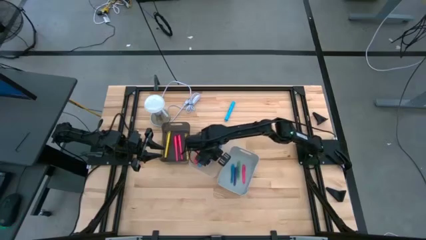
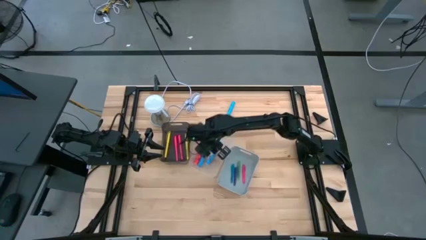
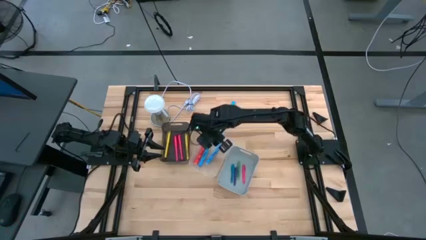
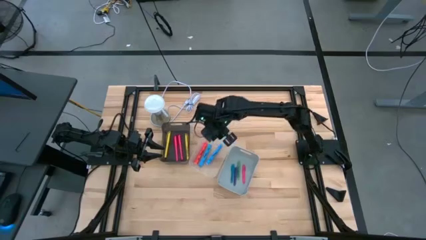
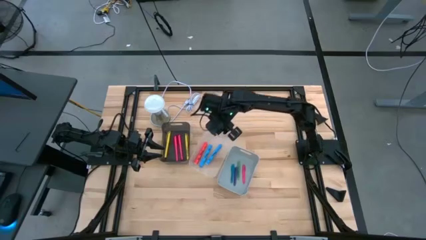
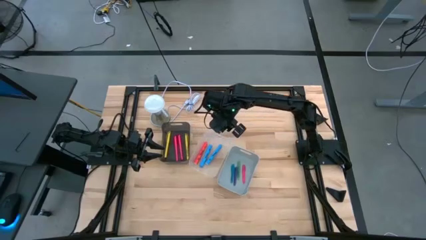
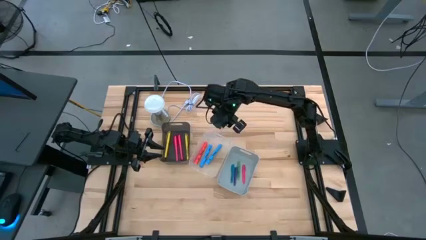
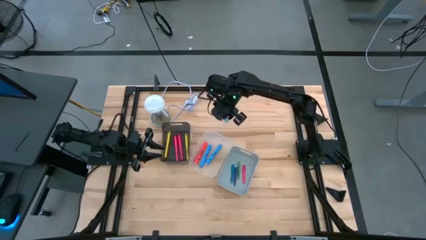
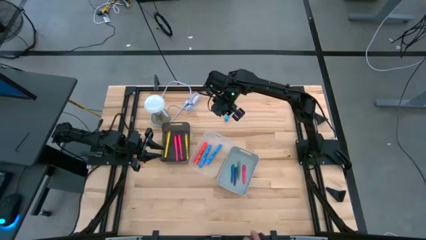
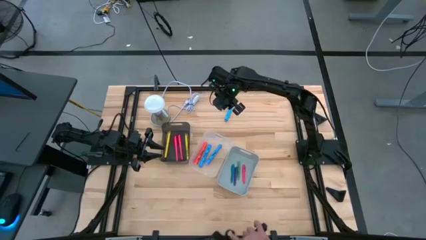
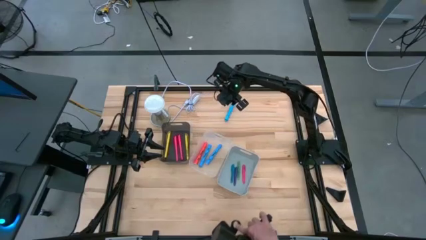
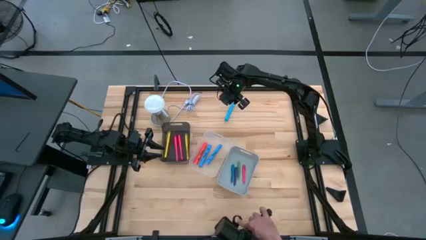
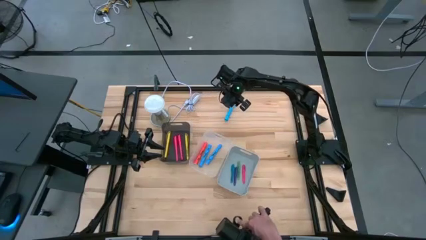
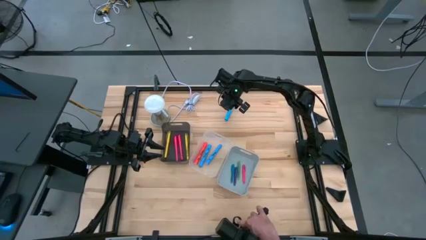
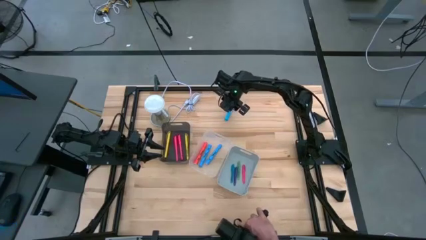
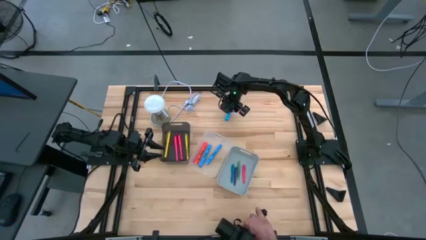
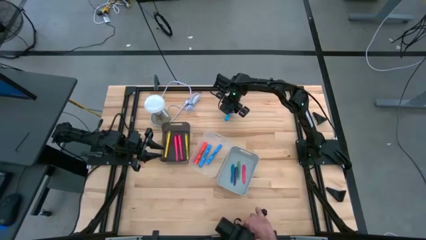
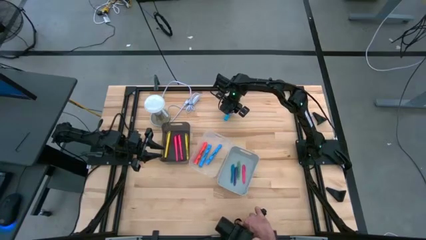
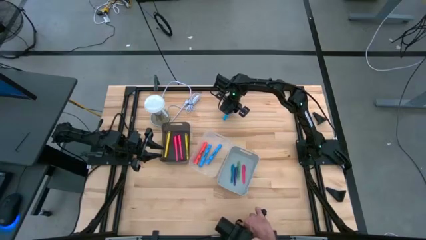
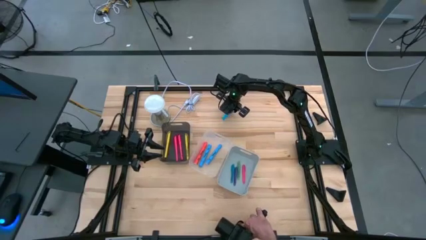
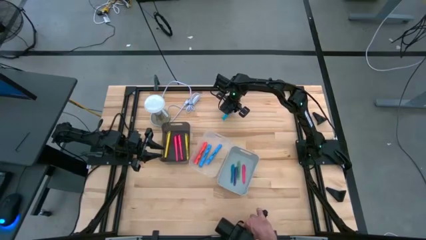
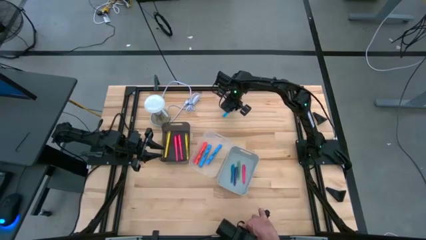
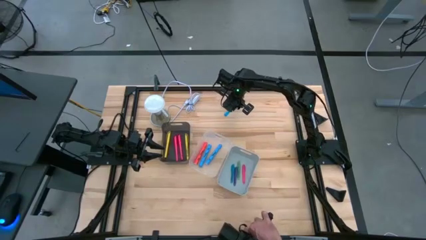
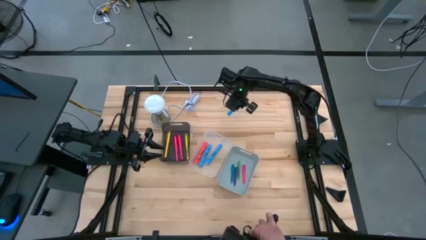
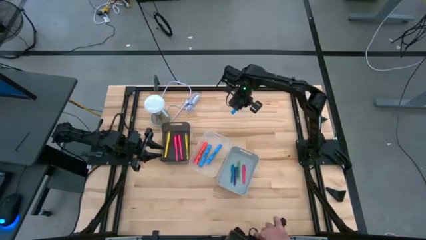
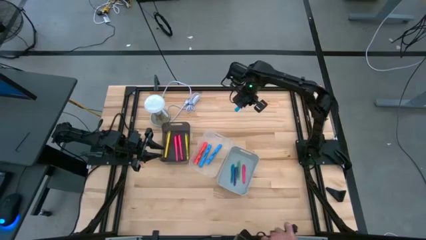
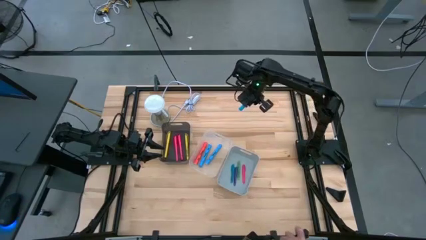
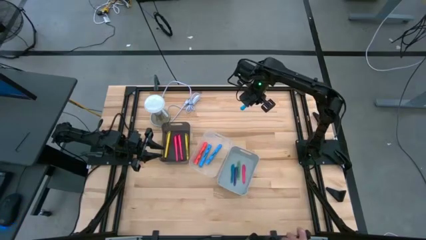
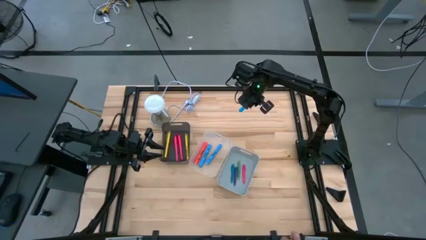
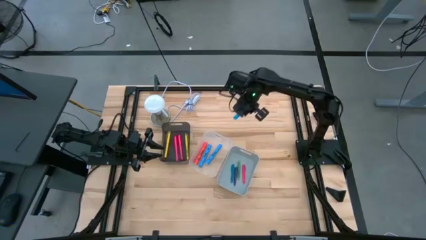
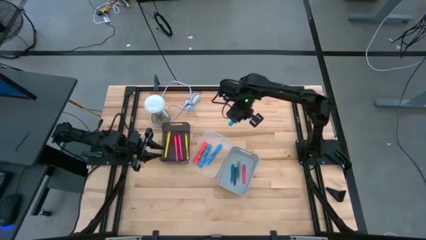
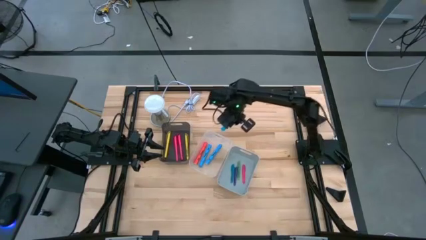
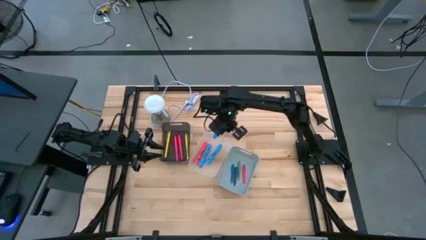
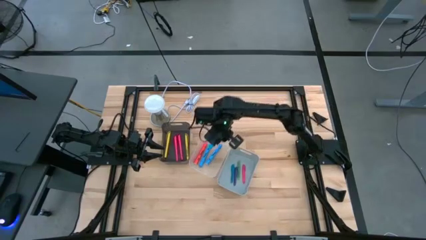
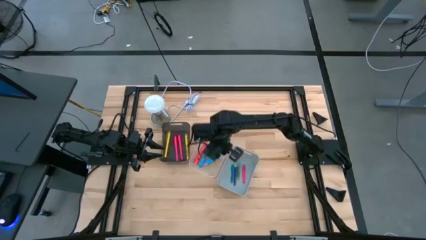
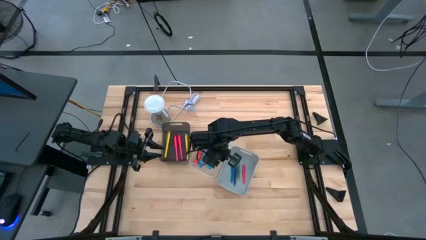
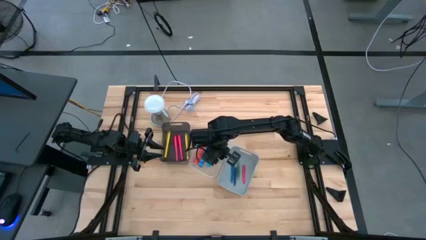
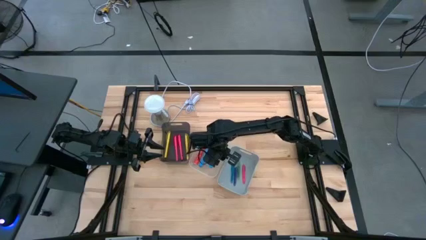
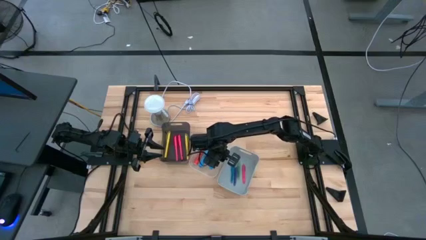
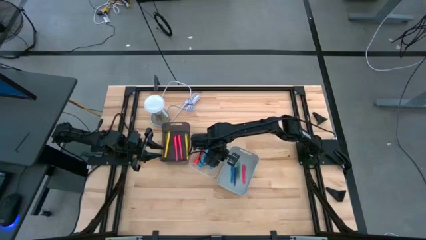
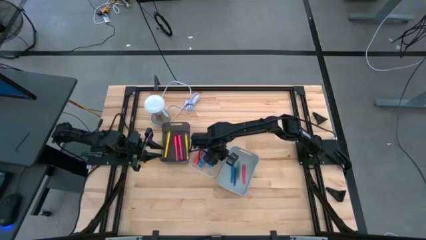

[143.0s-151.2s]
Task: Pick & Place Markers
Put the blue highlighter into the transparent bin

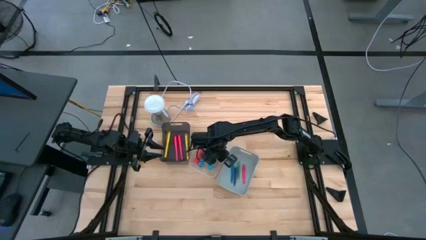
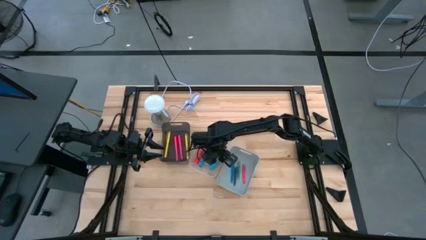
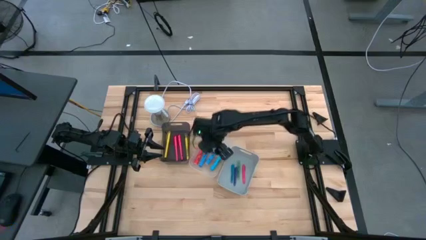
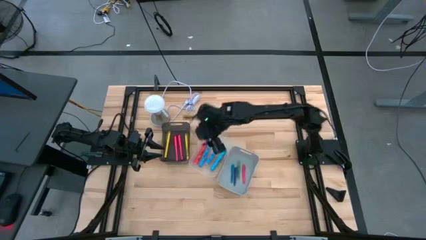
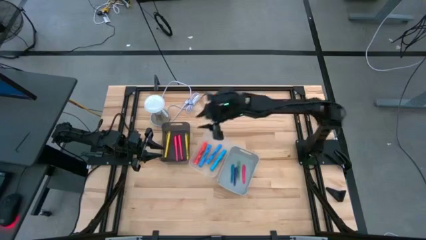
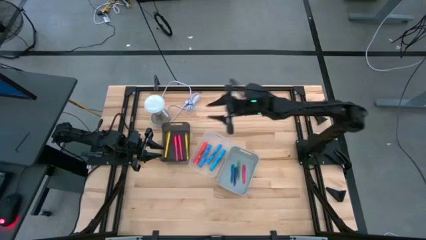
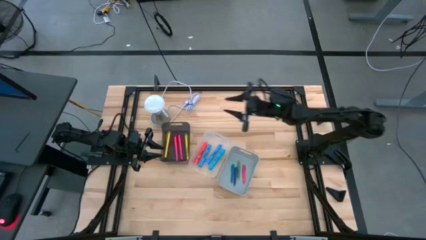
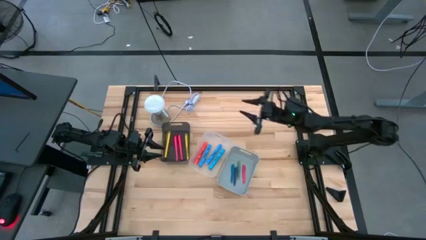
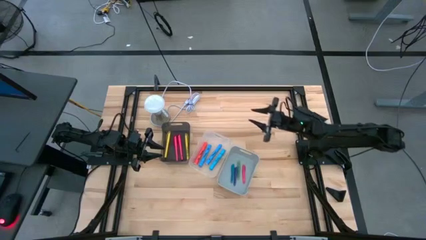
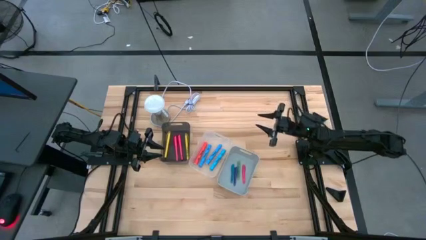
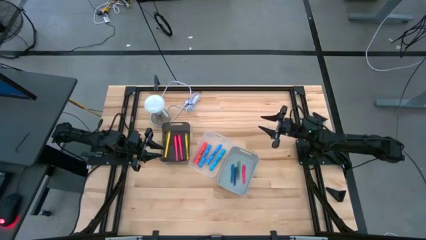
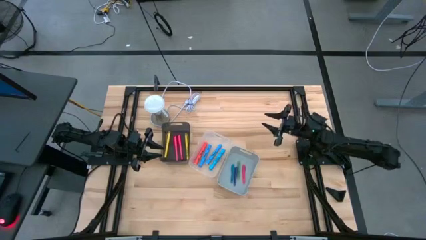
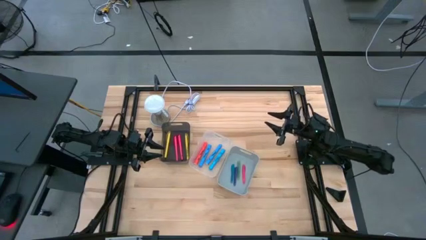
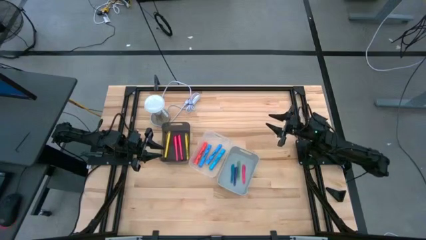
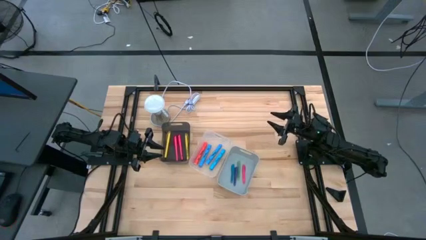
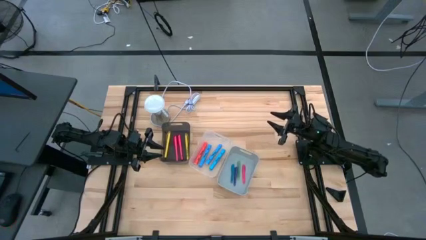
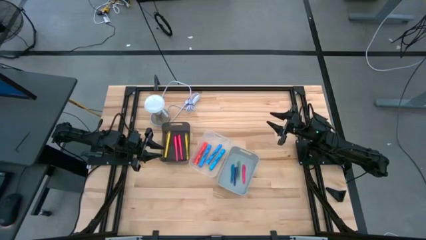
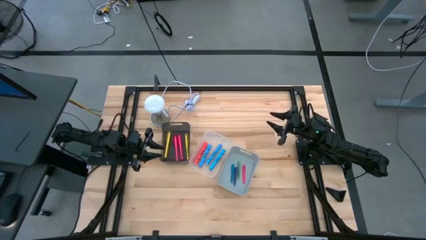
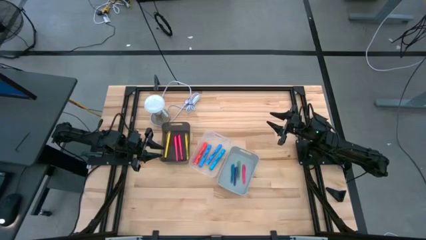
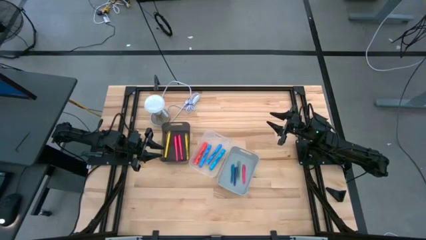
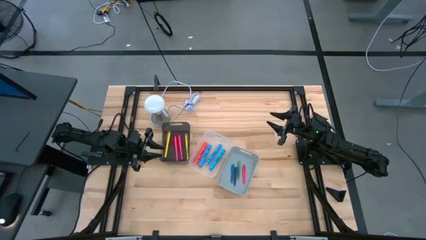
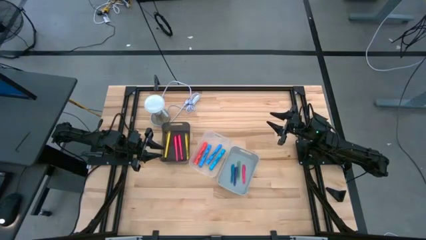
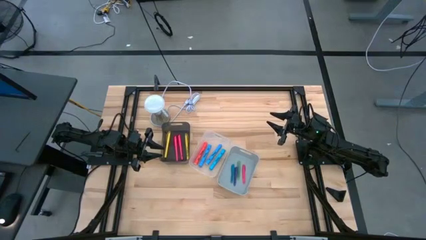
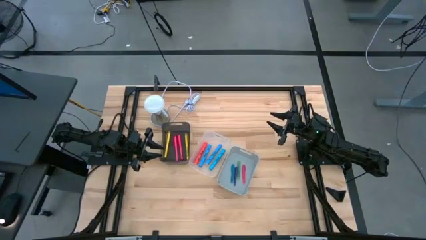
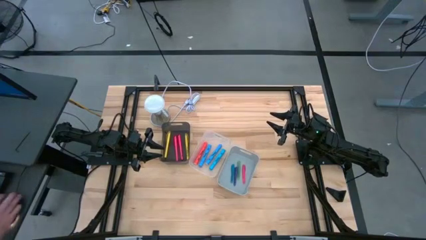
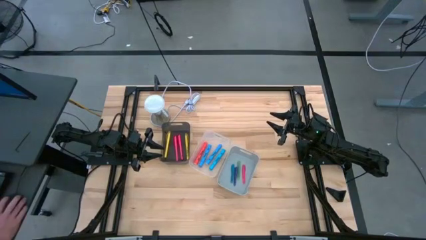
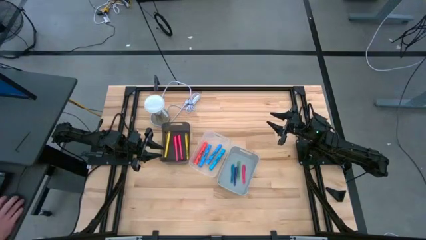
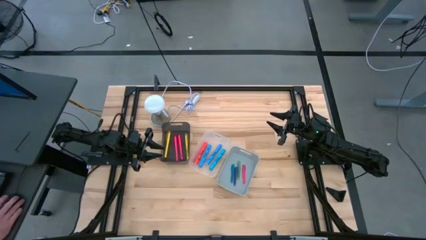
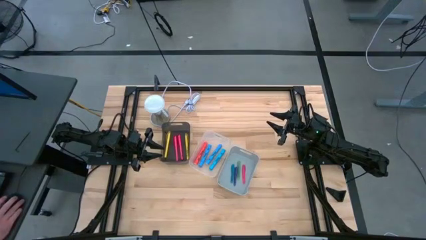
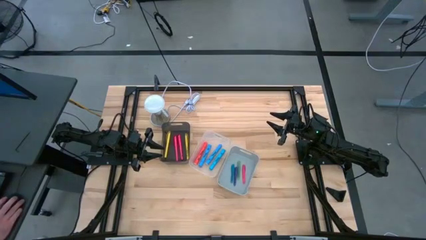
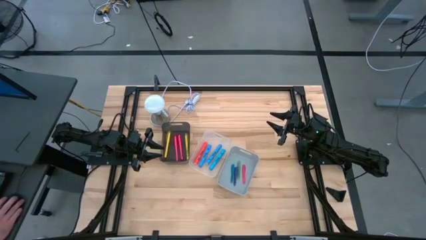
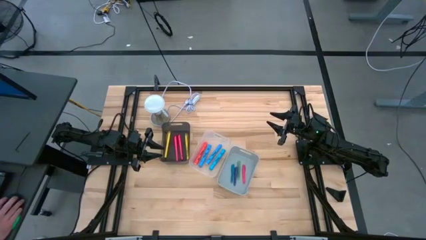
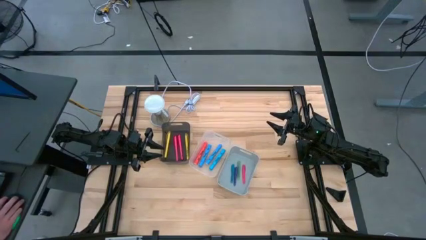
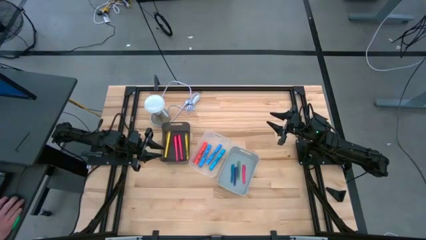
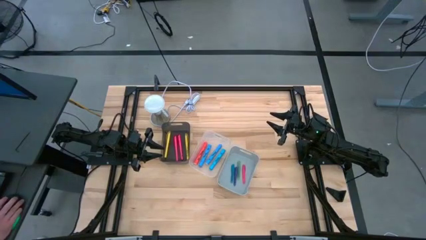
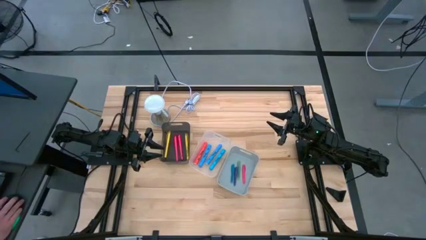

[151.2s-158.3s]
Return to Home Position

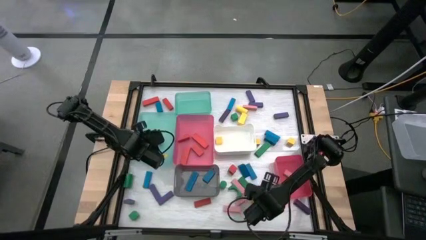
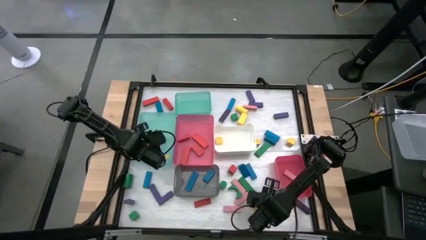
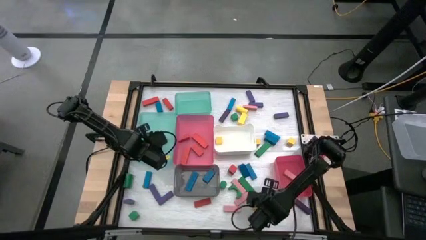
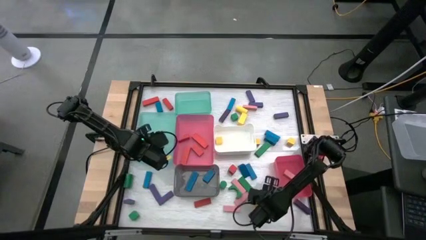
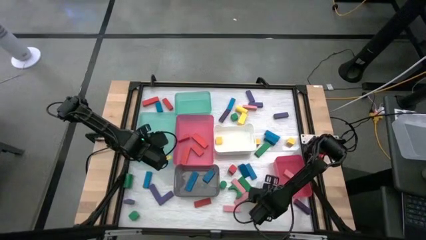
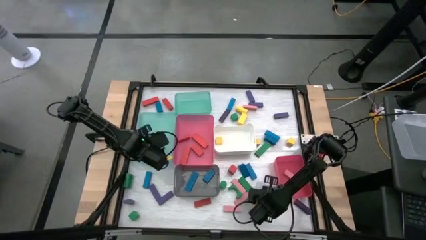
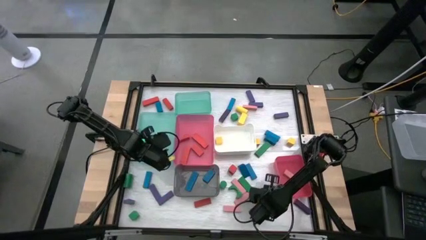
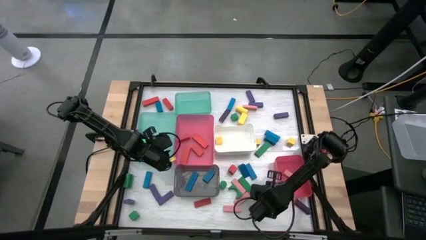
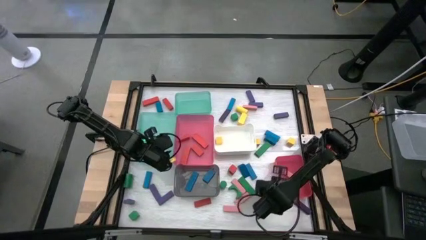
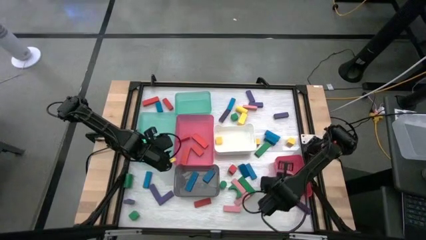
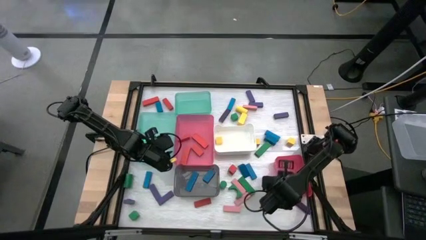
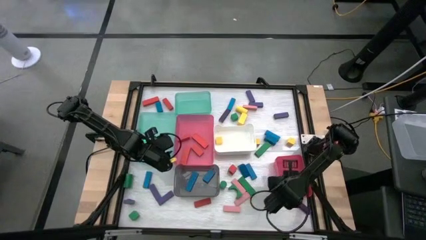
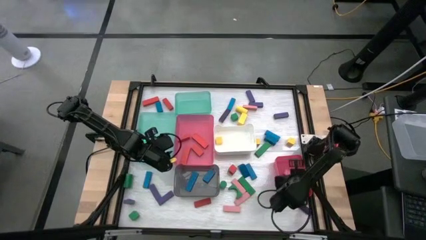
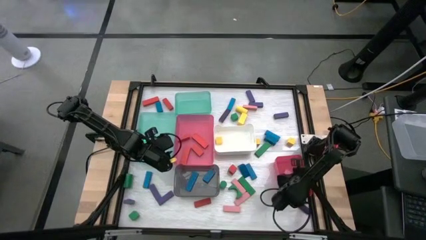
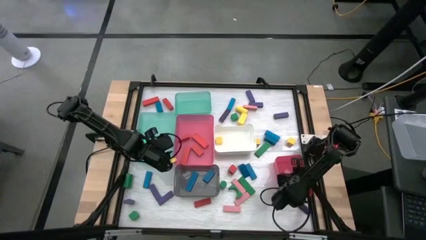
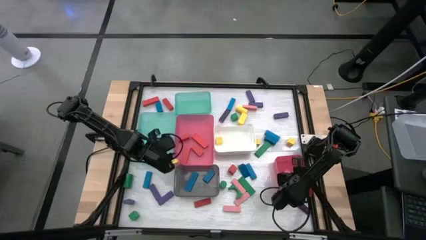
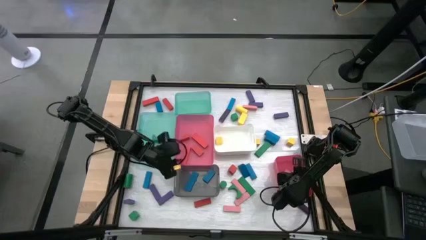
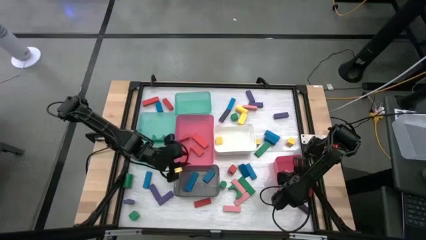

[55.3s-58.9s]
Task: Sort blocks
Put the pink block into the bottom pink bin
